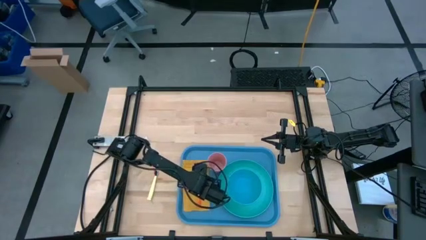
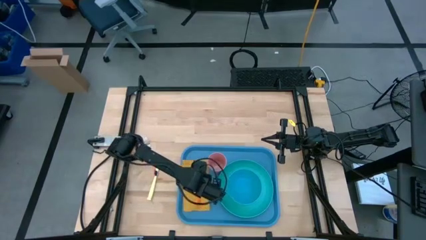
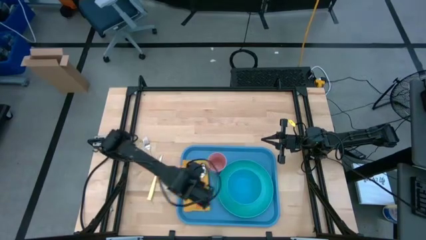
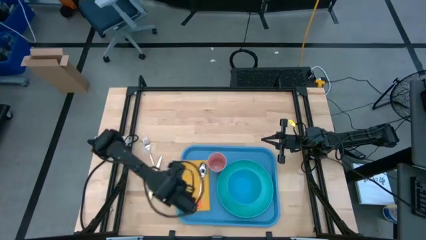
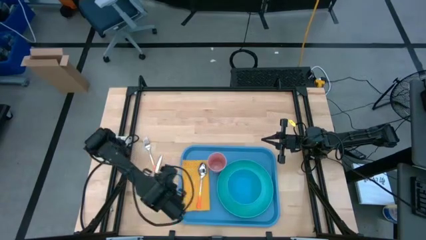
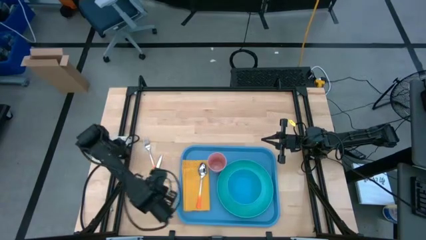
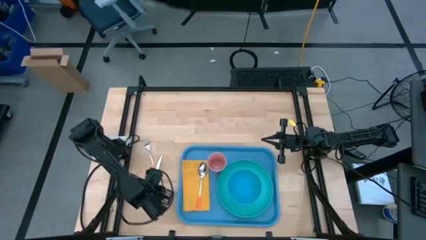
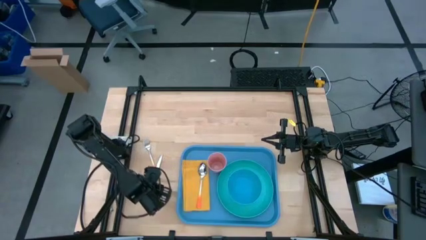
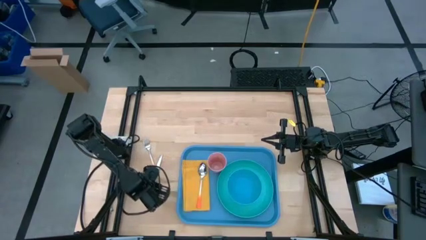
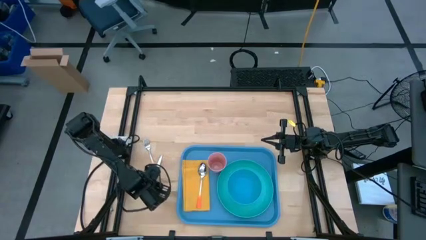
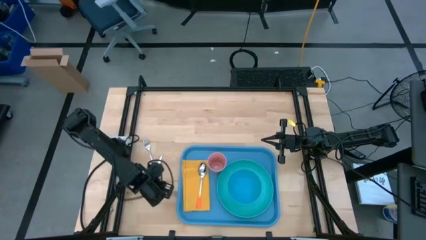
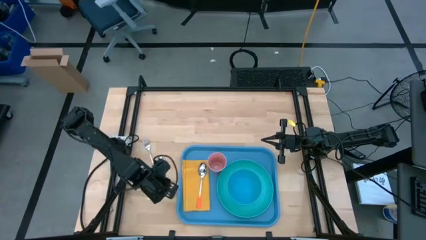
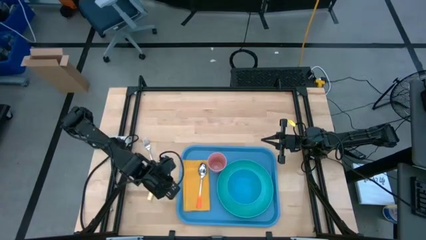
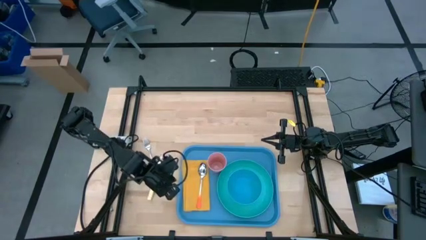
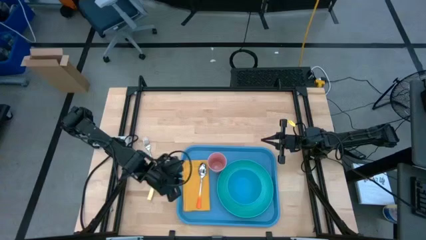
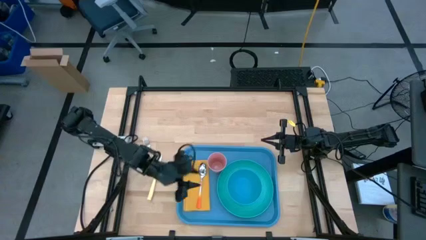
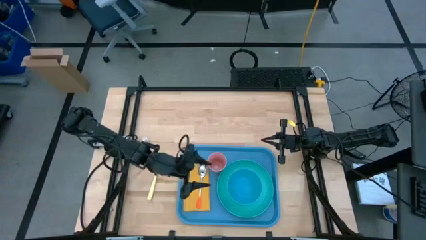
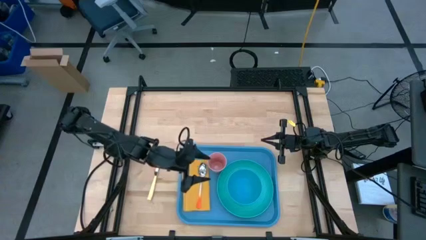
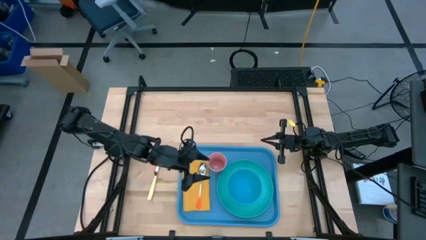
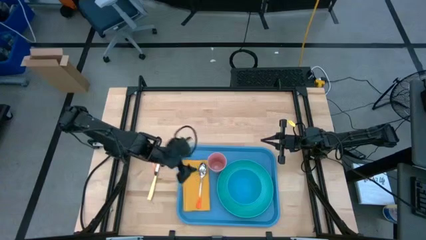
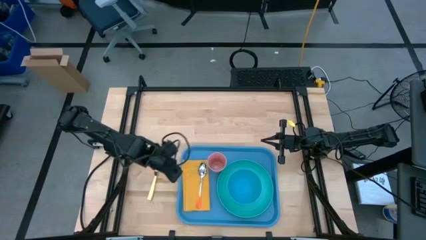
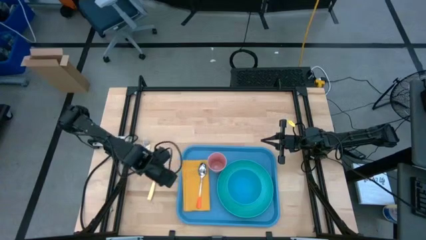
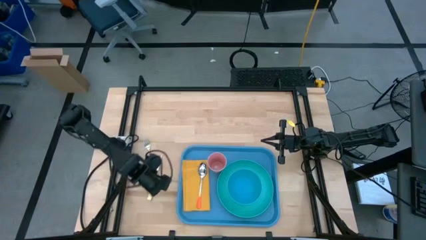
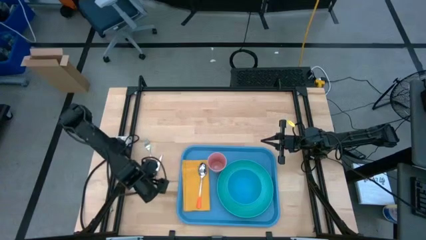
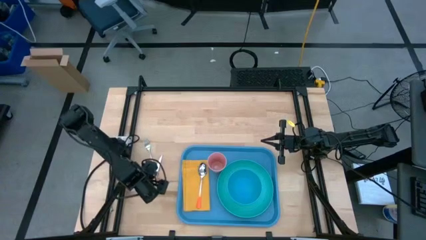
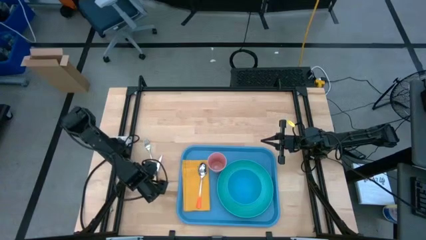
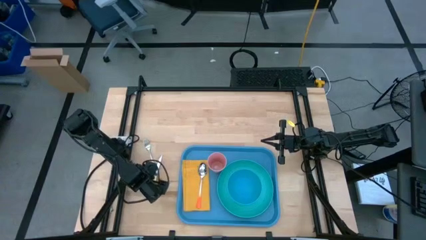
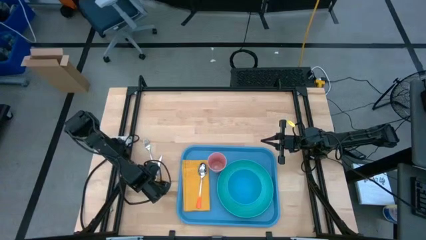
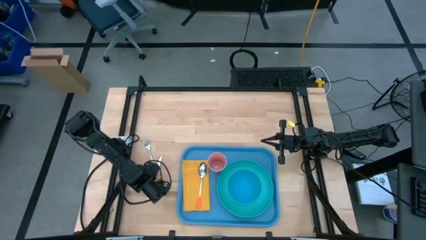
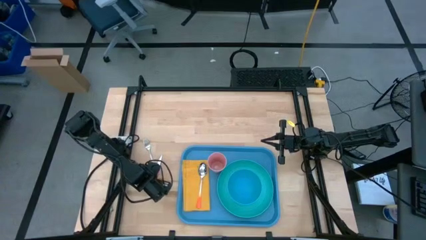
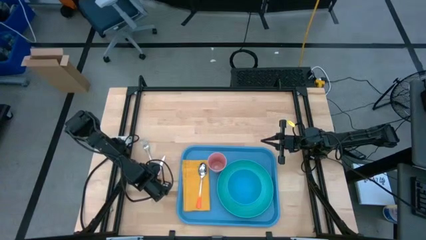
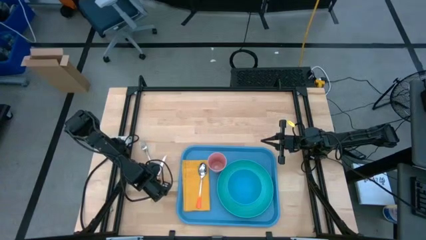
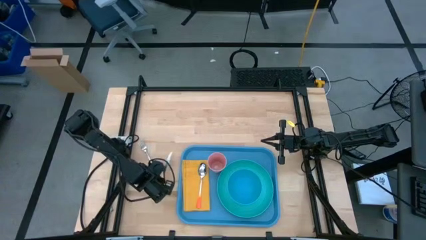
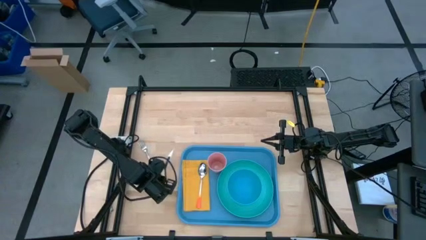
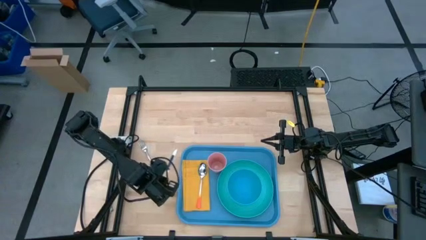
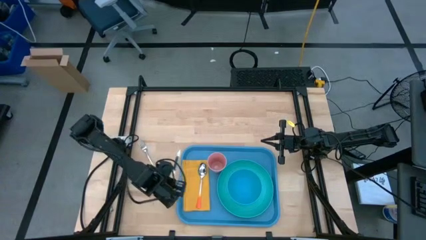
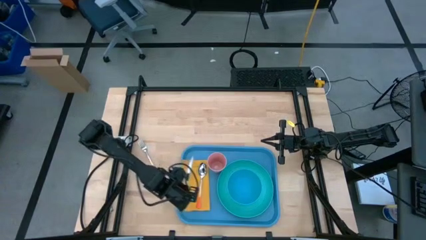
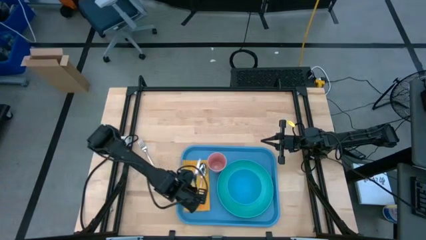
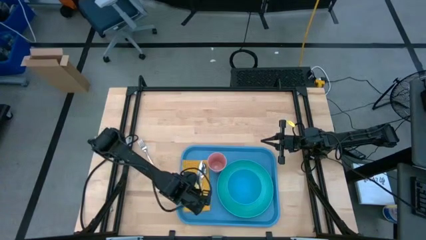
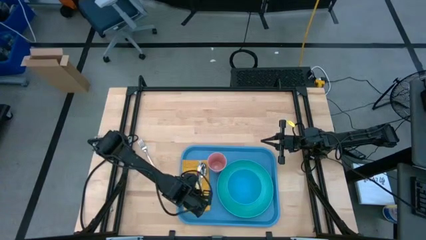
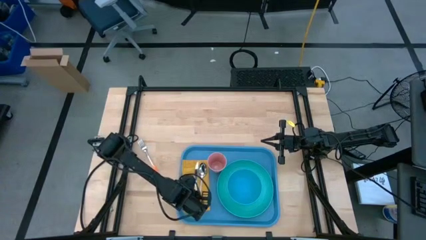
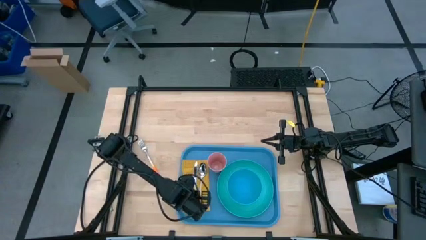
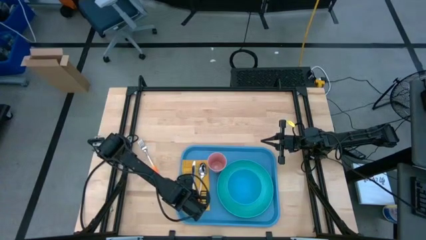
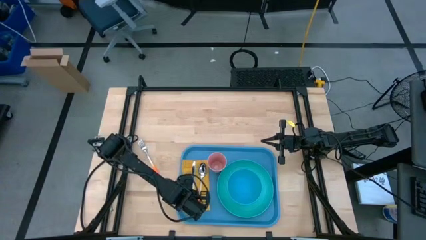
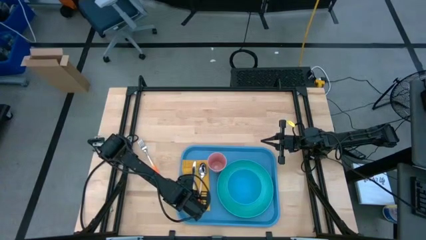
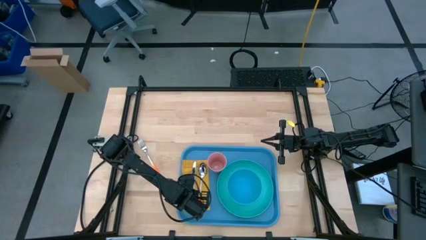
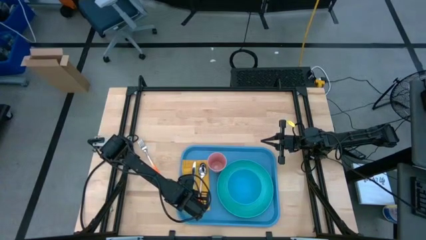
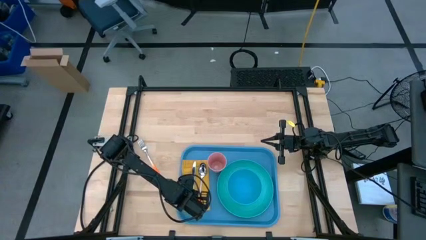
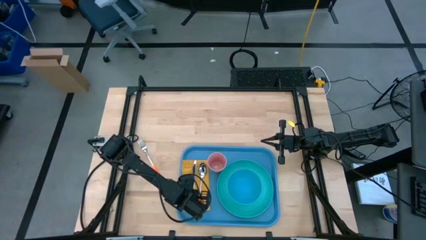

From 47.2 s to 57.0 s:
Task: Set up tray
Put the yellow table knife to the left of the orange spoon on the blue tray

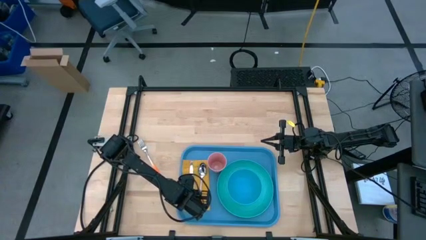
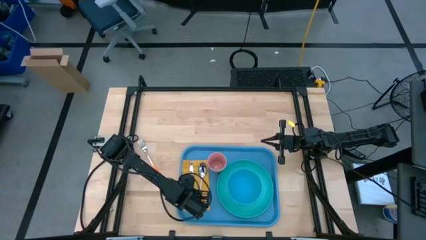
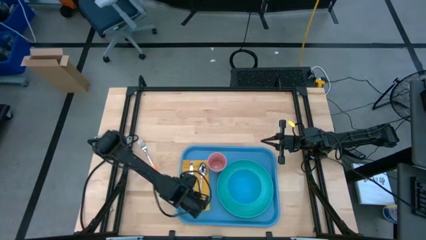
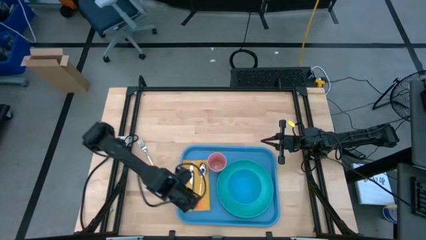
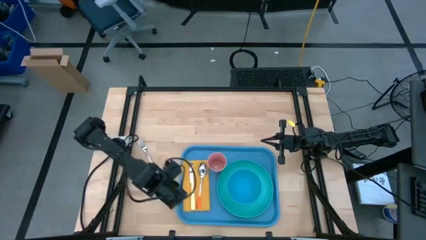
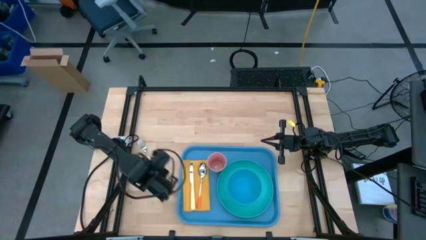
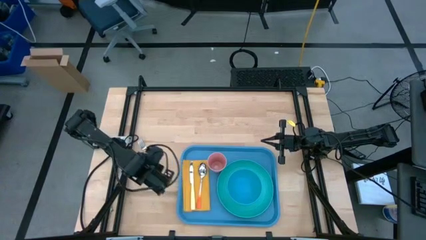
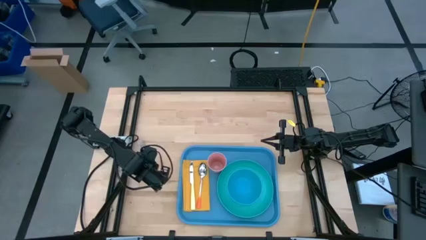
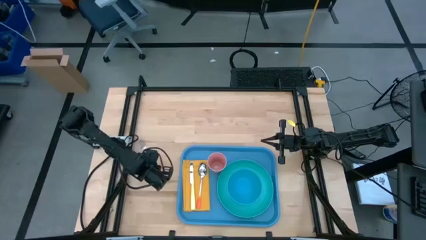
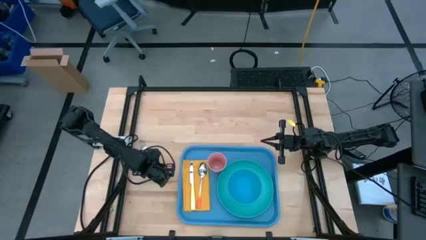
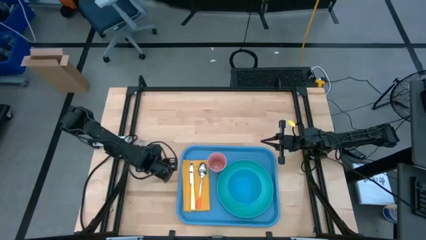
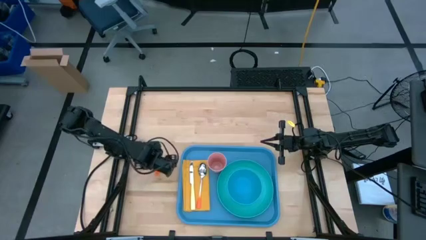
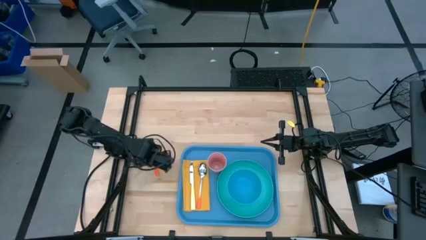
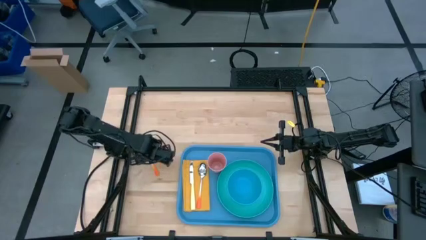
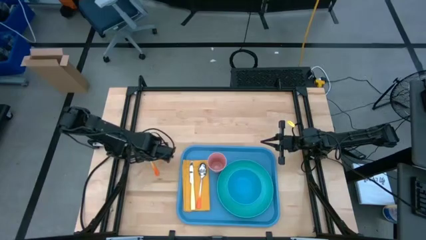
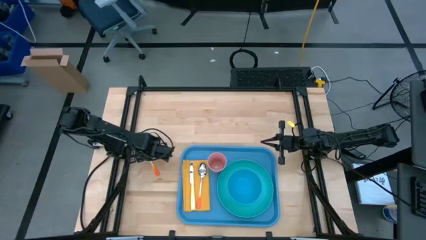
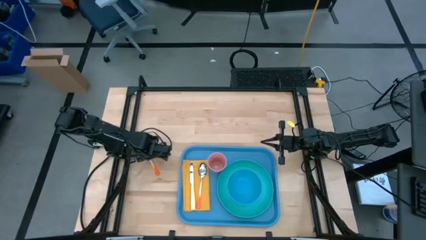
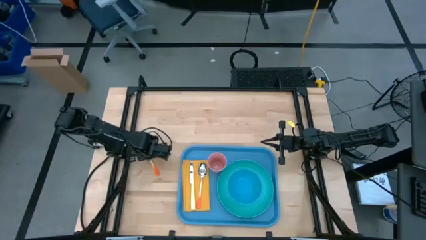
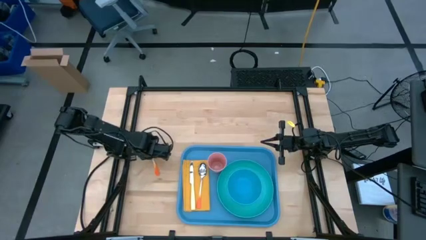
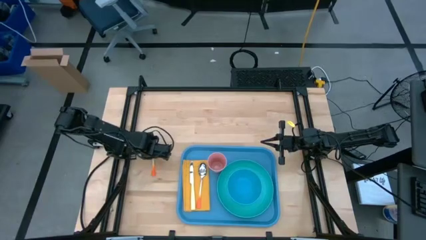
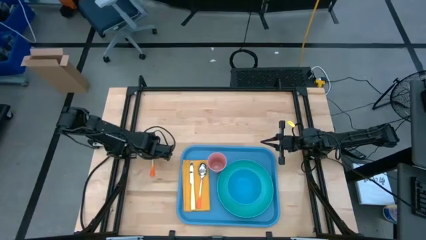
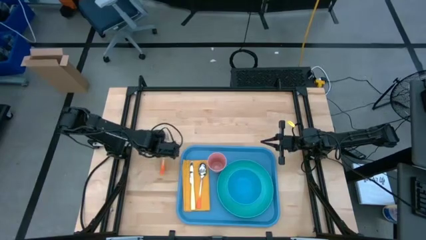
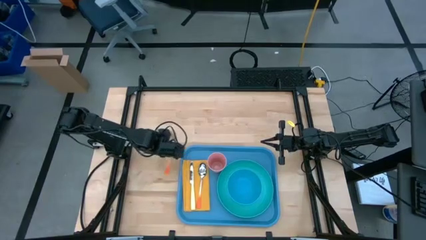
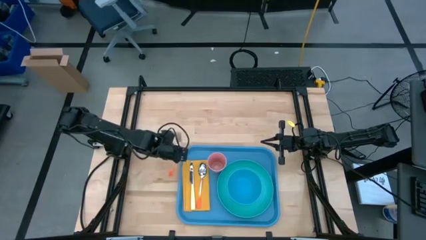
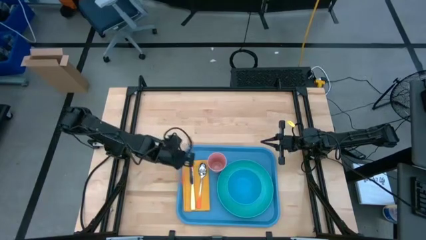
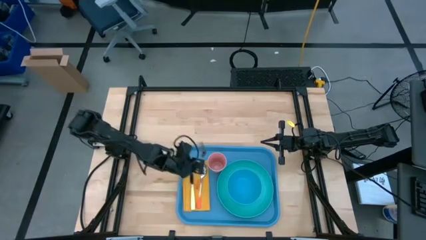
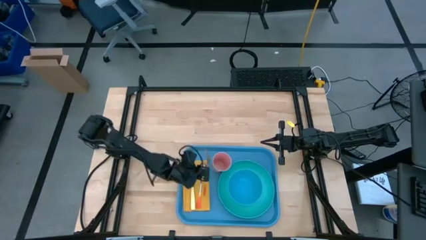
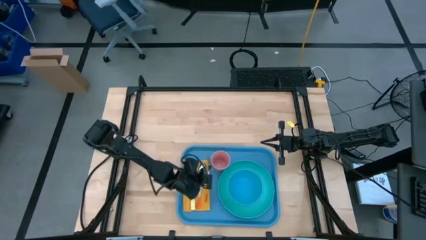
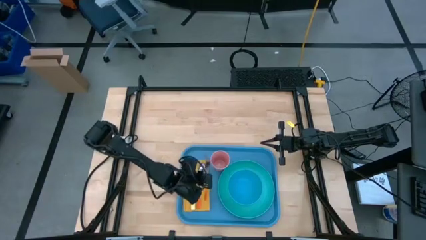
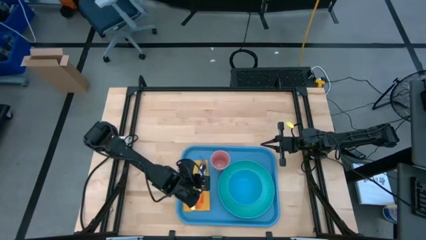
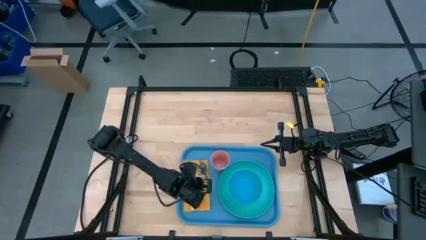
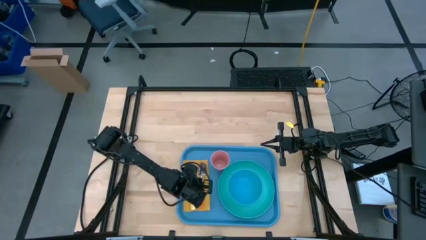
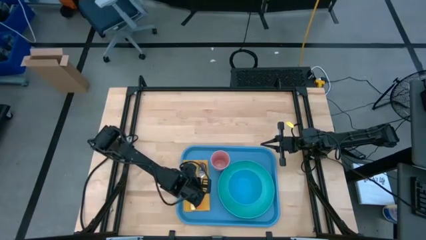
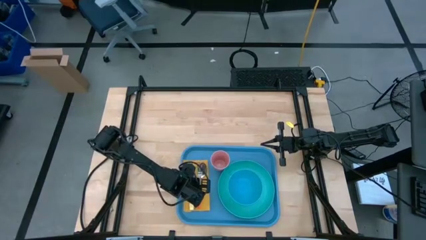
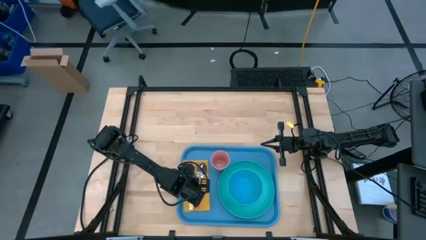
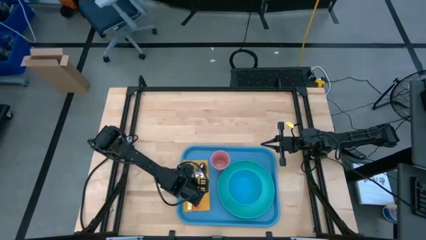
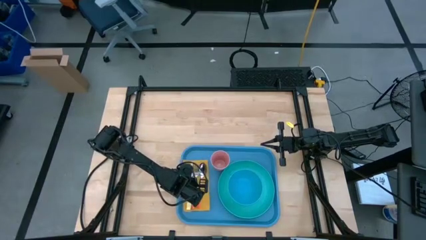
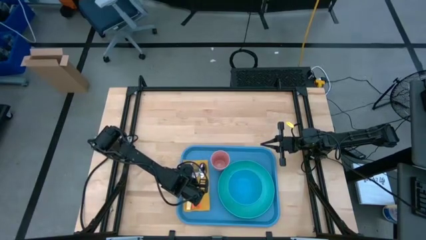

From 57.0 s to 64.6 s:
Put the orange fork between the orange spoon and yellow table knife on the blue tray
